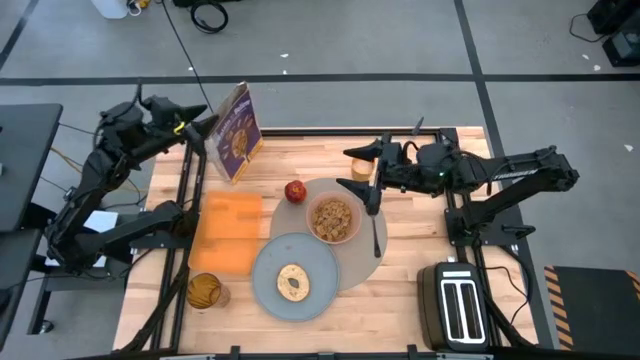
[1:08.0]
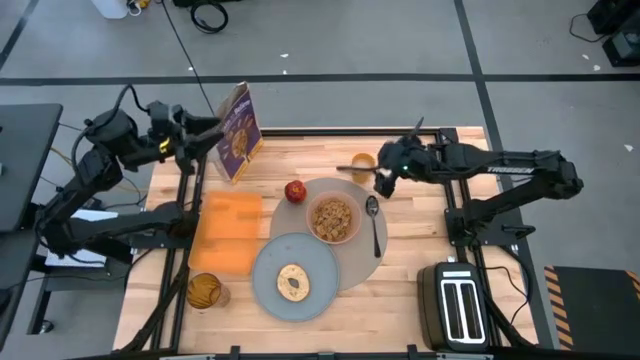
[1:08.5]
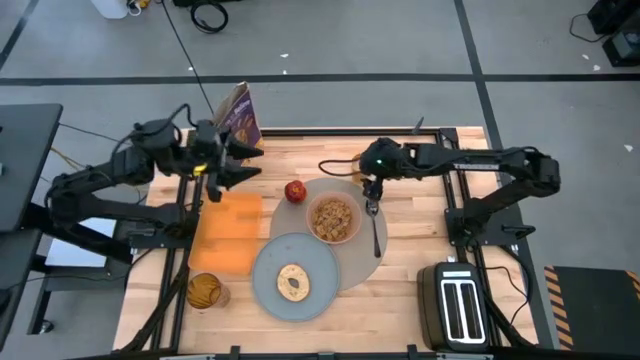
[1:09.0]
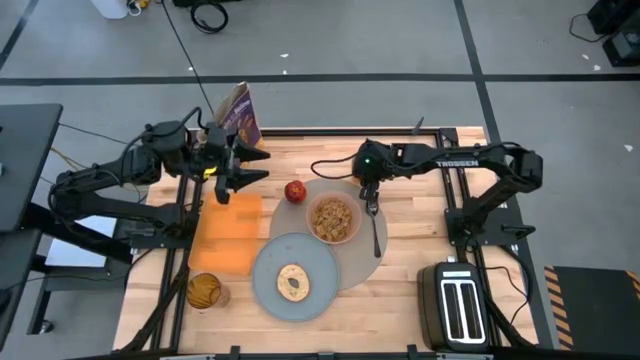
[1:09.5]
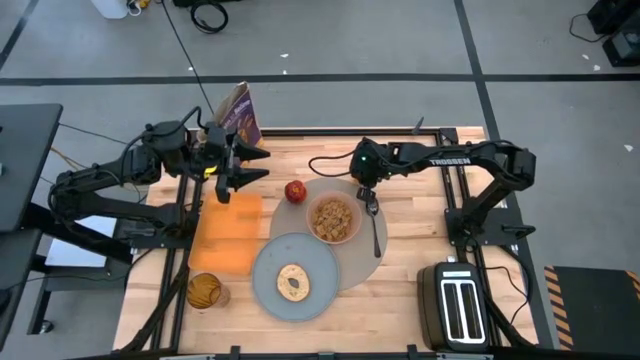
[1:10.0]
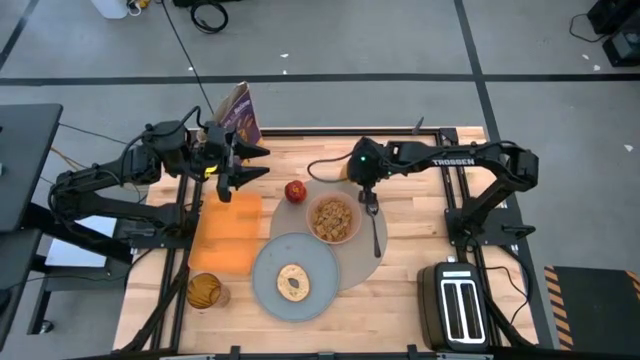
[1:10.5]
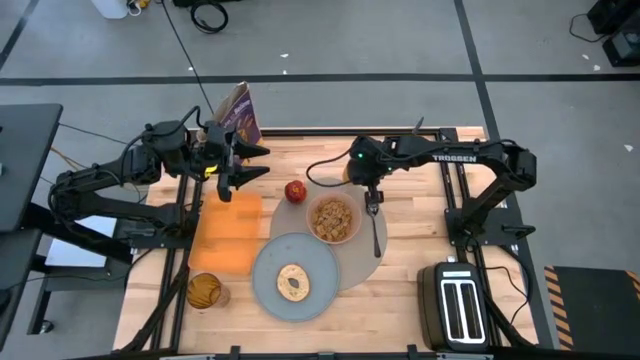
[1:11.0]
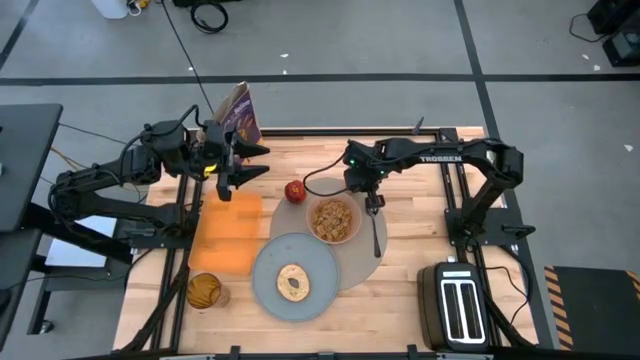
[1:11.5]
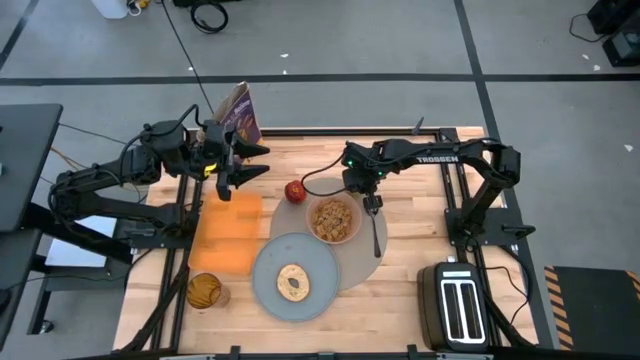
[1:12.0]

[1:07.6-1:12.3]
Task: Arrange a breakfast setting
Put the yellow cup of milk on the gray placemat to the top right of the pink bowl

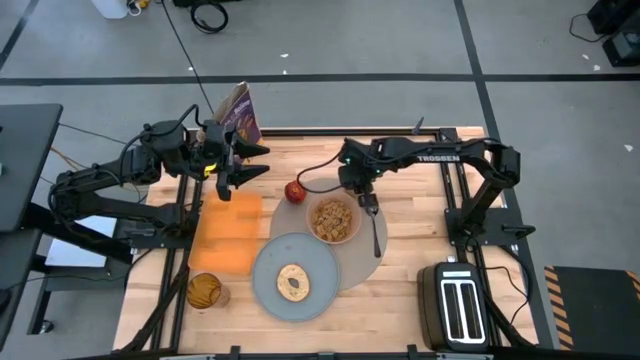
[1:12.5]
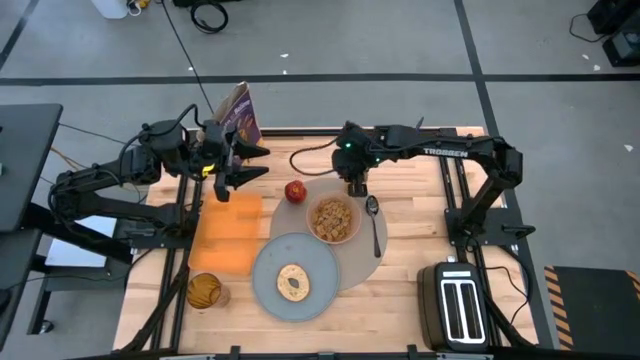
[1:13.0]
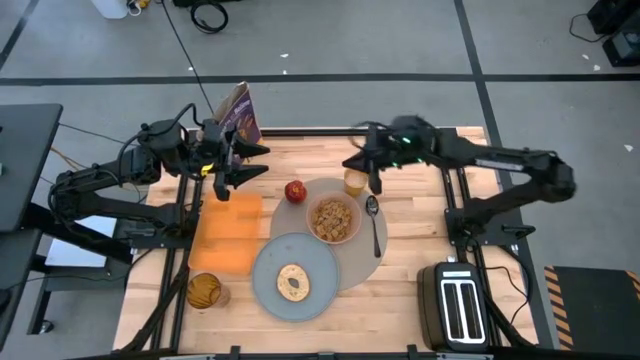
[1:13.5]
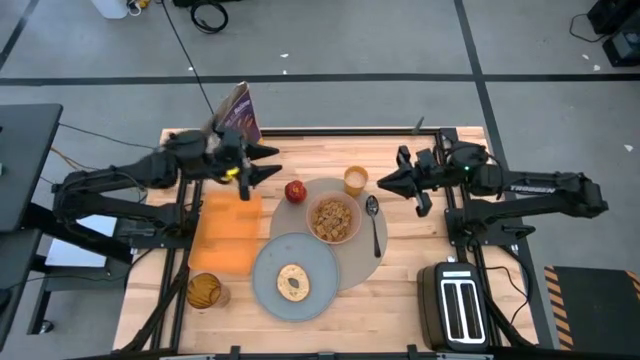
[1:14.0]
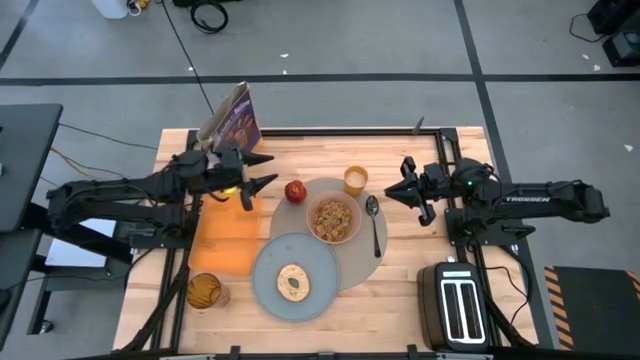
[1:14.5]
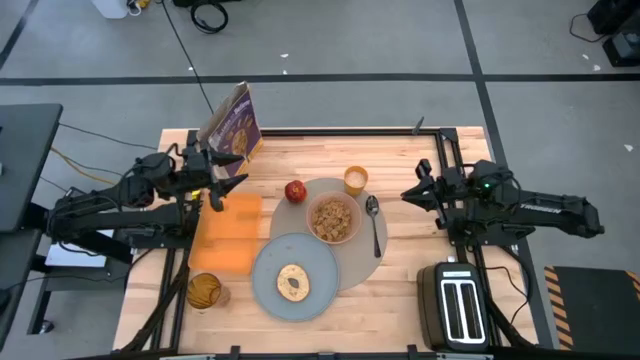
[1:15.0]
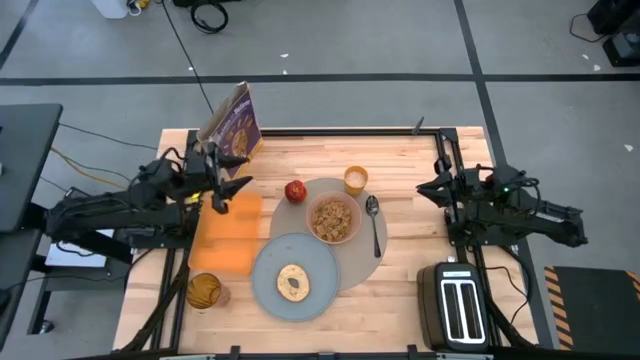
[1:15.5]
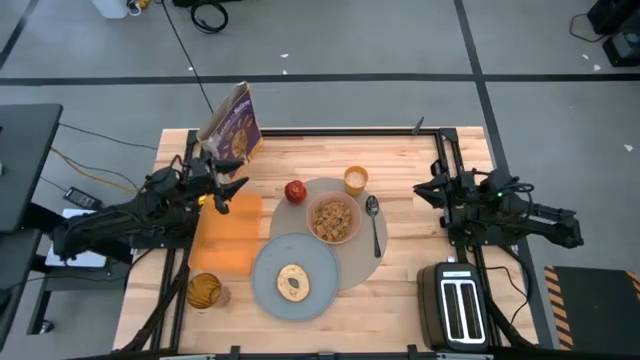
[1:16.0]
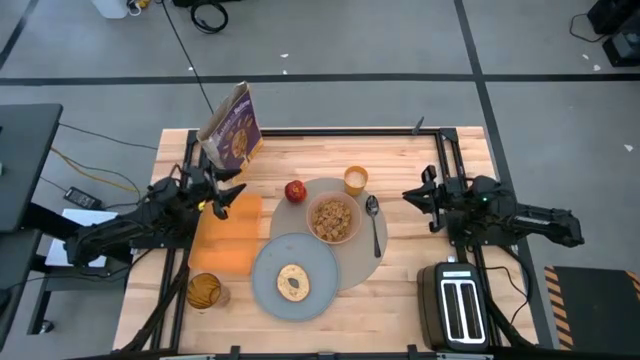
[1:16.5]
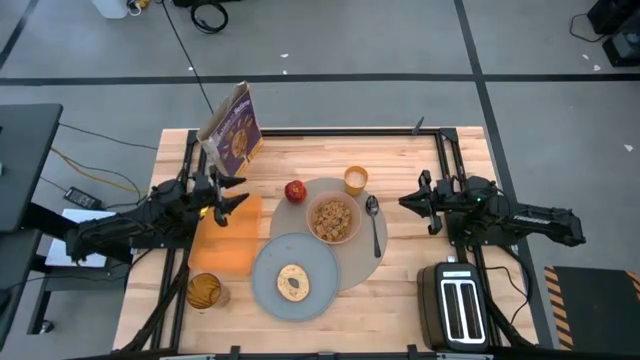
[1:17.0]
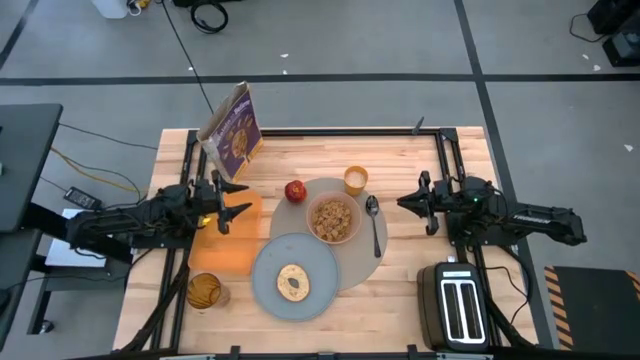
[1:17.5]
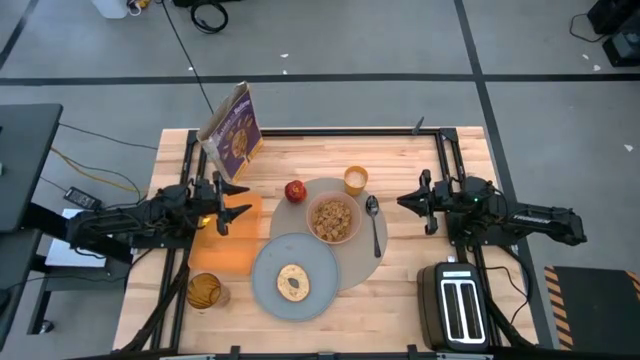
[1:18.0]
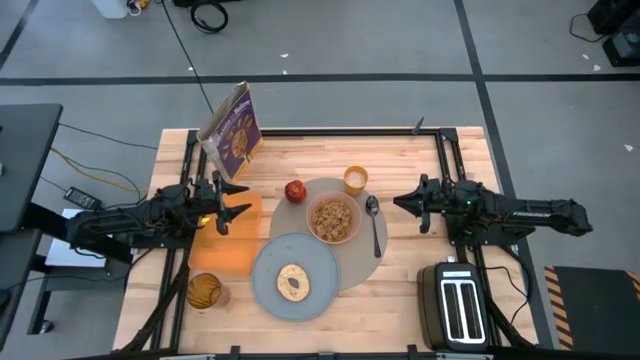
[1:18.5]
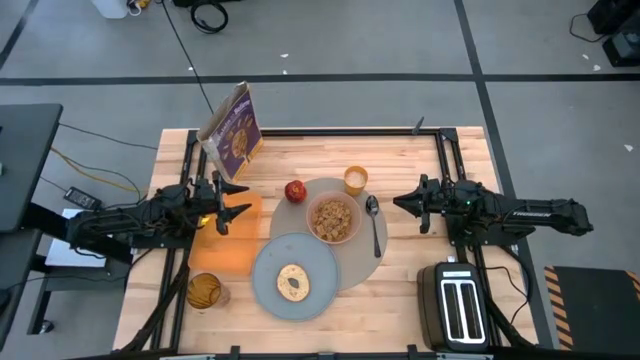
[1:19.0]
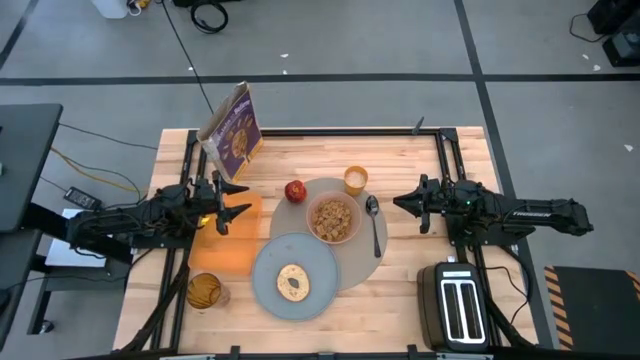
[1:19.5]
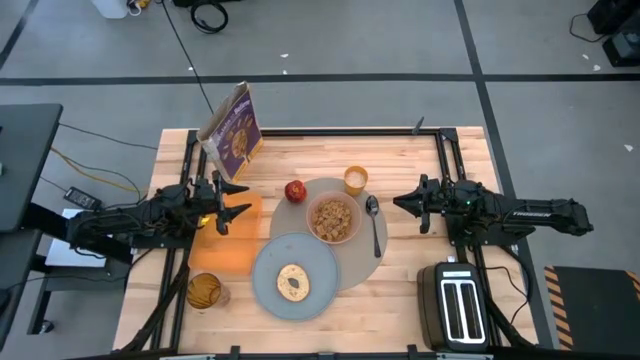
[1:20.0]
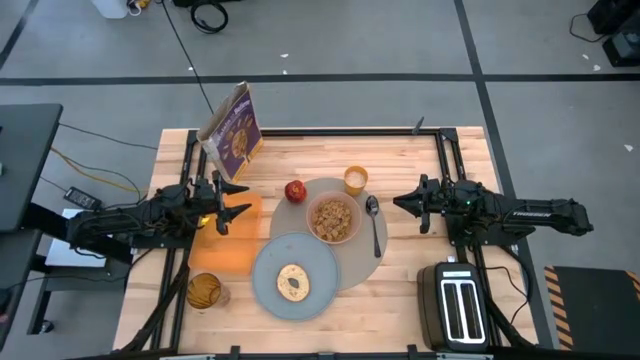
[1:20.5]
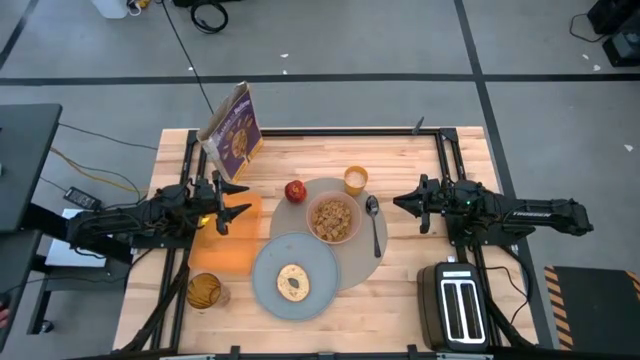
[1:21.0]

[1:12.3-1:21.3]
Return to Home Position

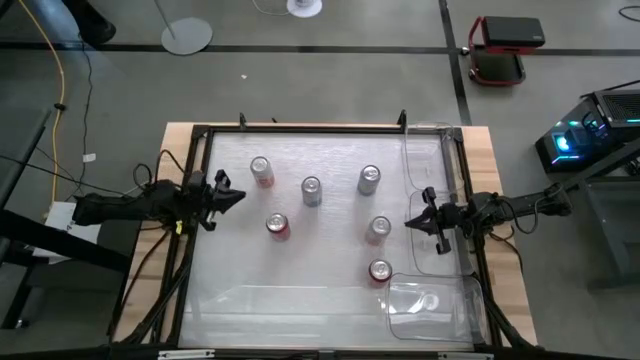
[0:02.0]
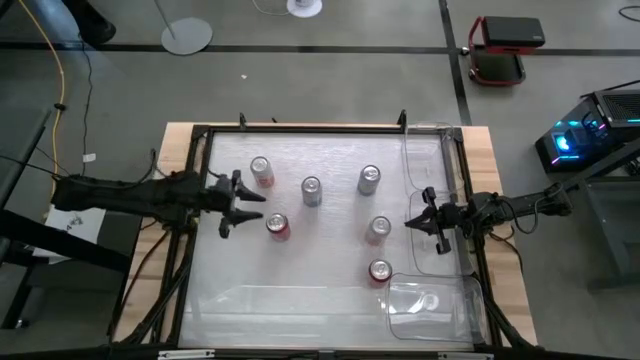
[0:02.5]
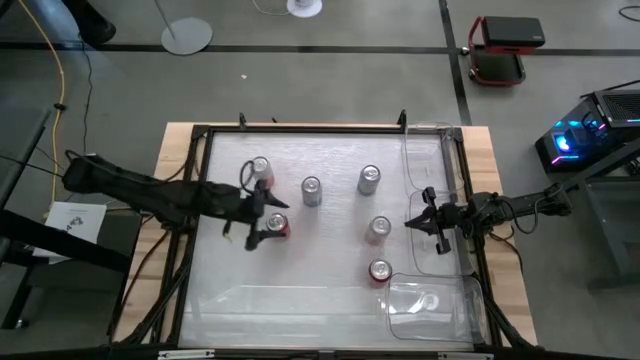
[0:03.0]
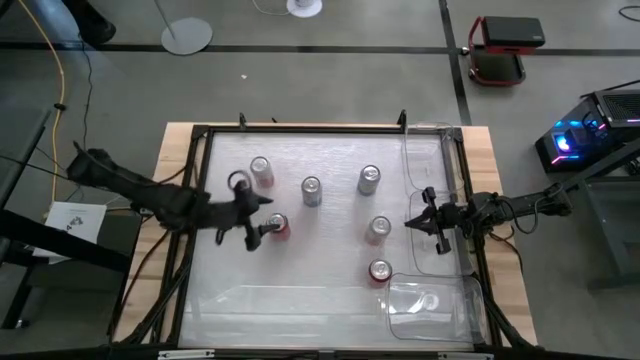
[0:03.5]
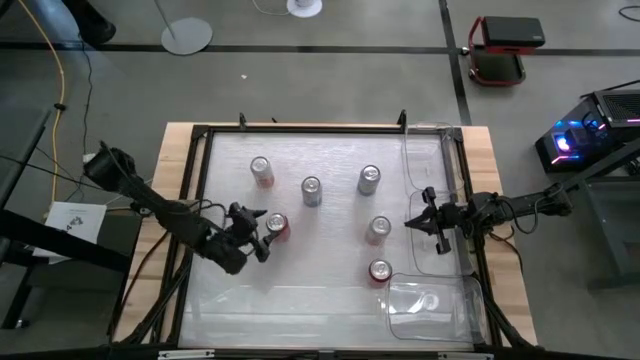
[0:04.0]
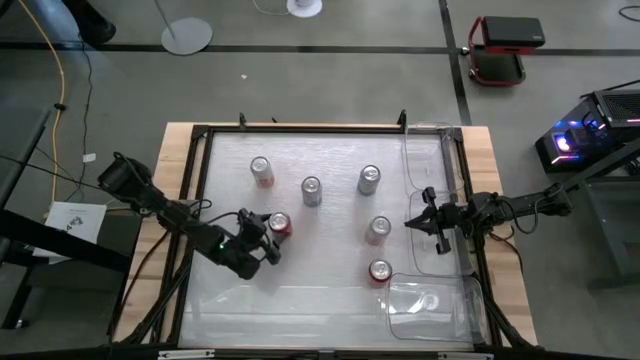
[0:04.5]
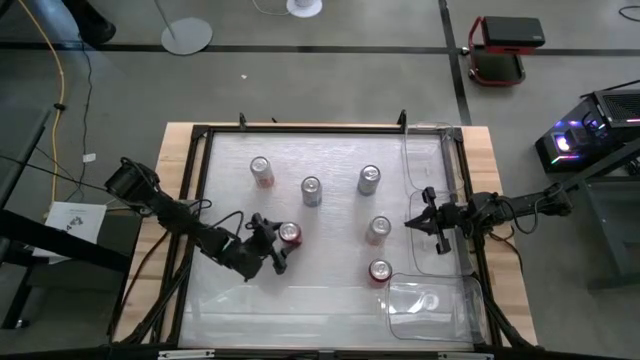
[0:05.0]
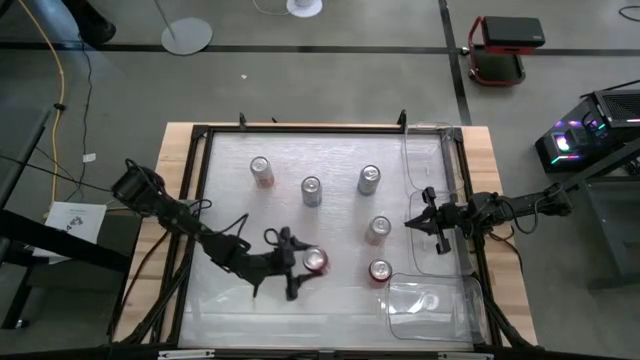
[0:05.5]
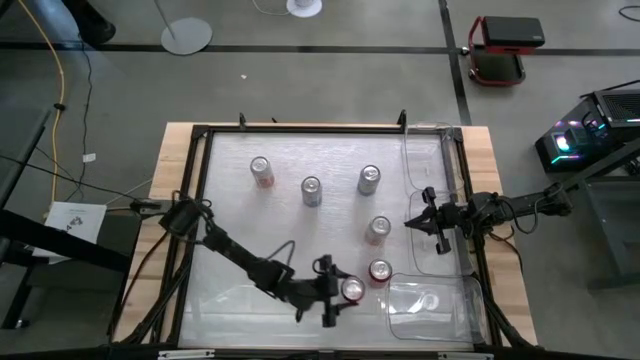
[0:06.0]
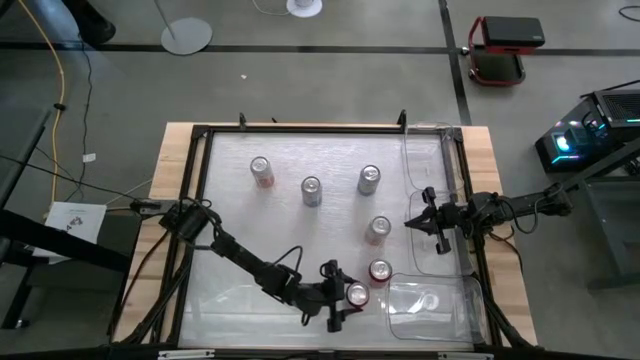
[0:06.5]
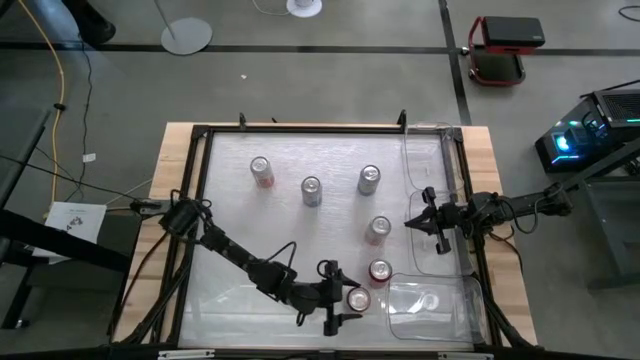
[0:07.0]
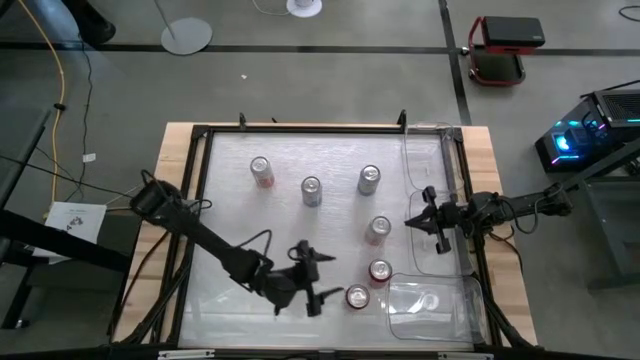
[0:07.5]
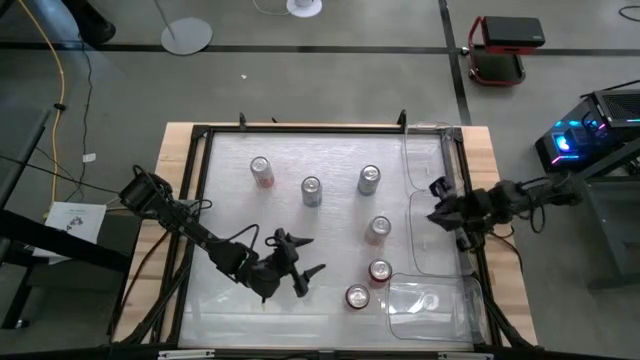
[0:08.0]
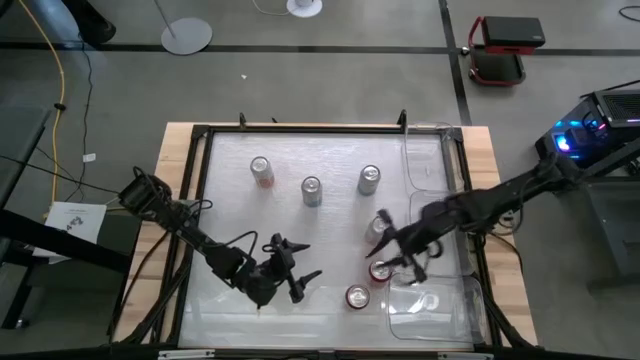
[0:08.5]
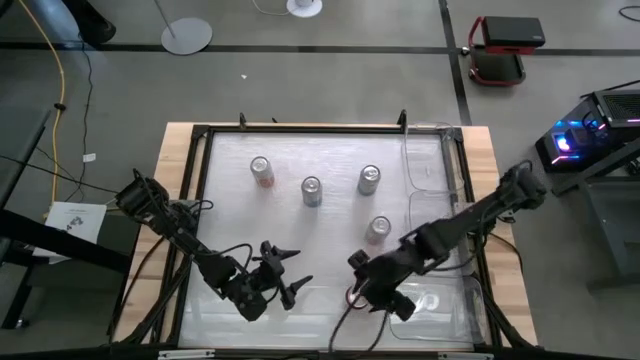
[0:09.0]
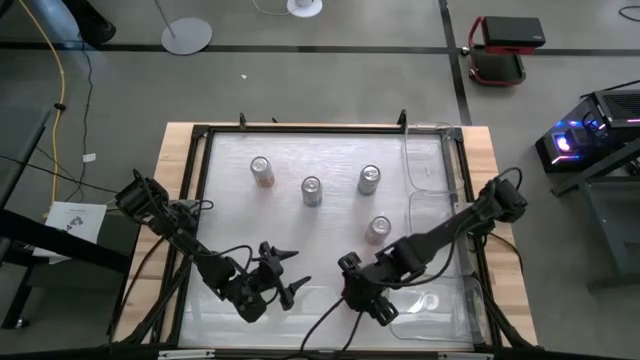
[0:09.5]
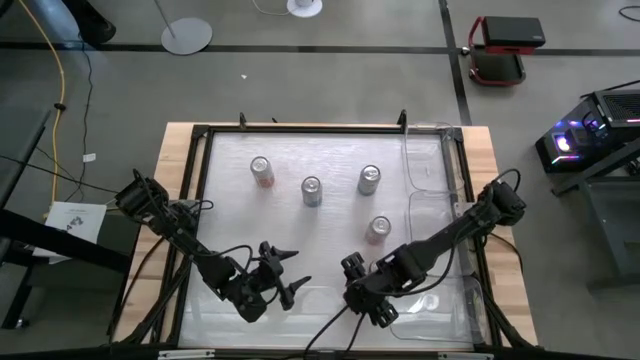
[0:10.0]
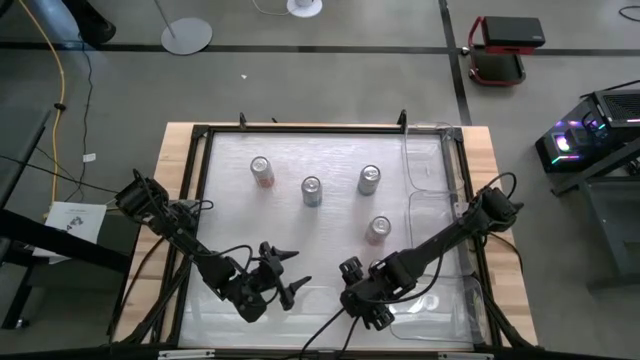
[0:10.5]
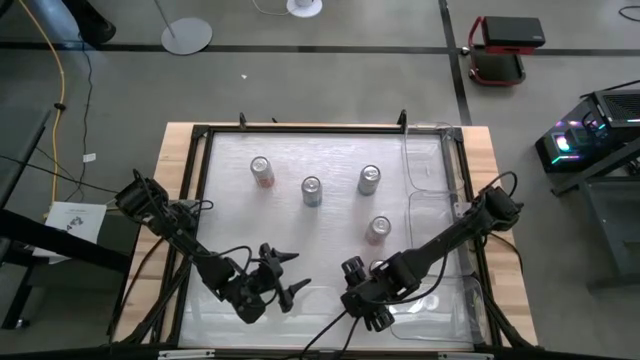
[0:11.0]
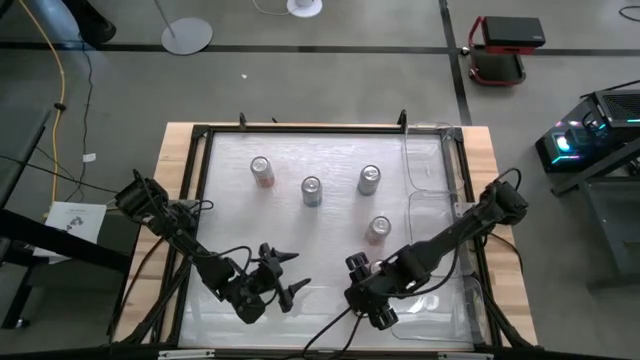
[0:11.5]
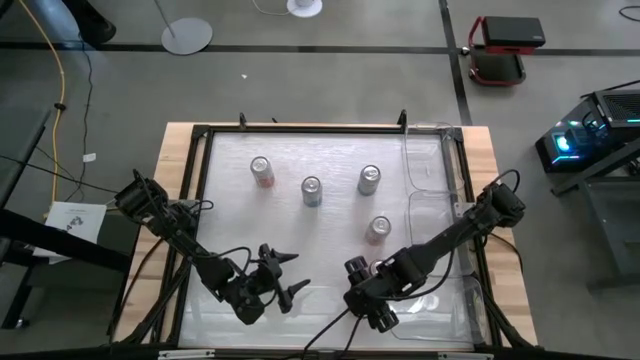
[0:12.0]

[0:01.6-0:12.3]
Task: Sort soda cans
Put the left red-black soda can into the bottom transparent bin
